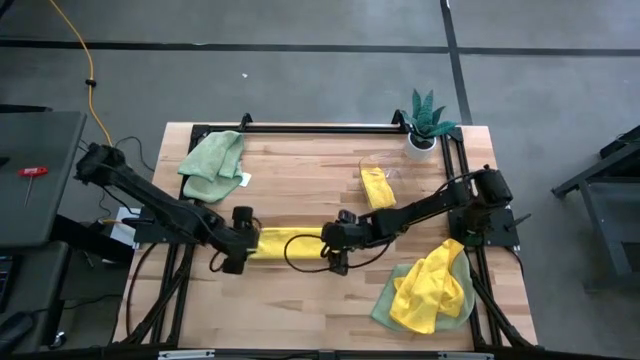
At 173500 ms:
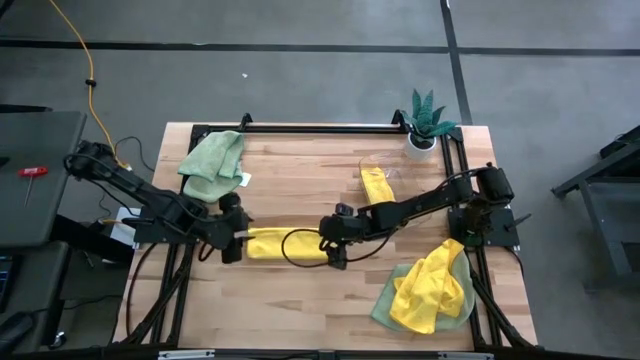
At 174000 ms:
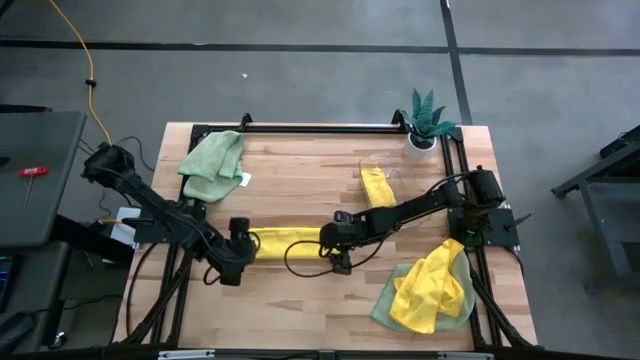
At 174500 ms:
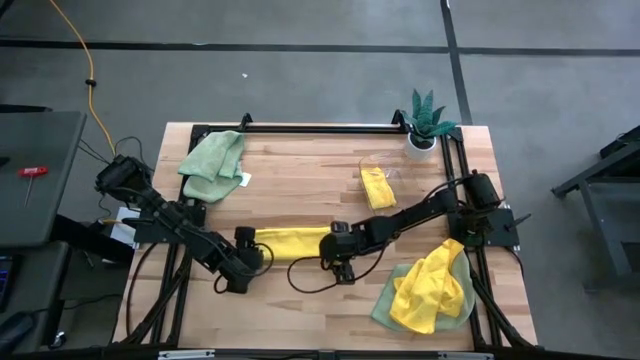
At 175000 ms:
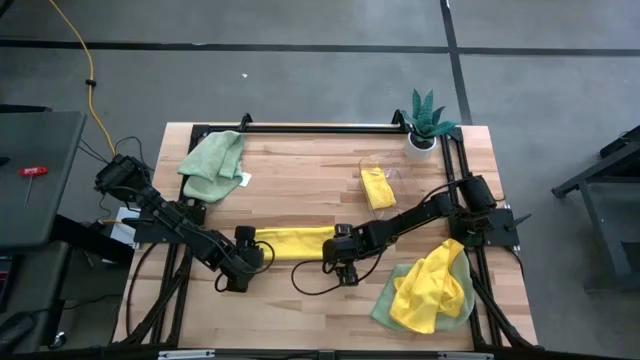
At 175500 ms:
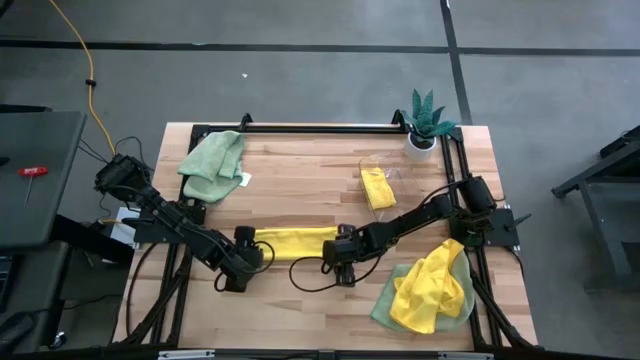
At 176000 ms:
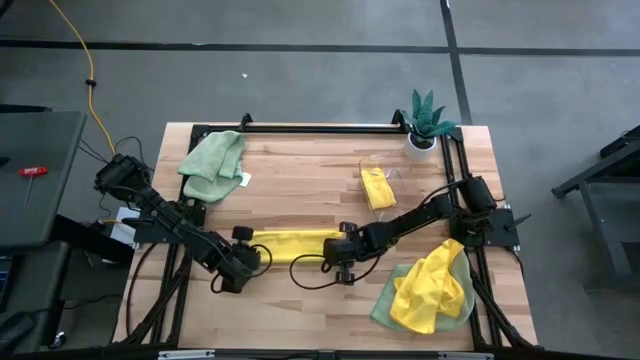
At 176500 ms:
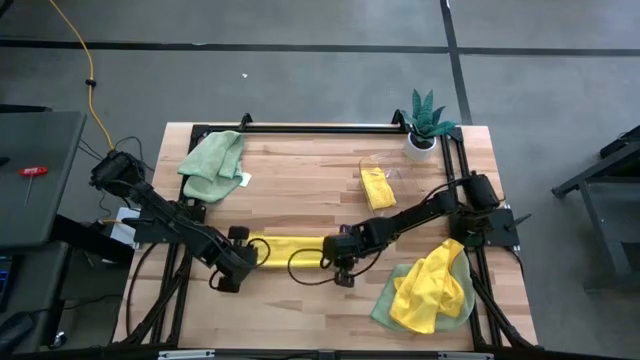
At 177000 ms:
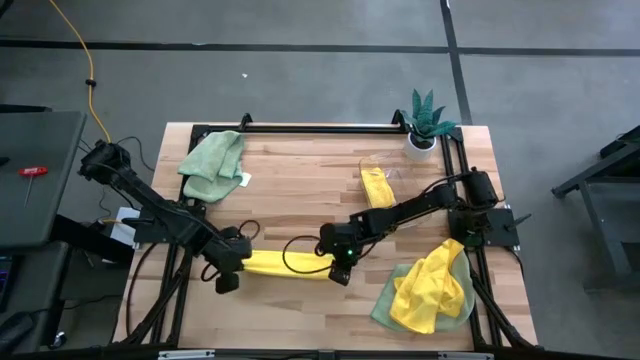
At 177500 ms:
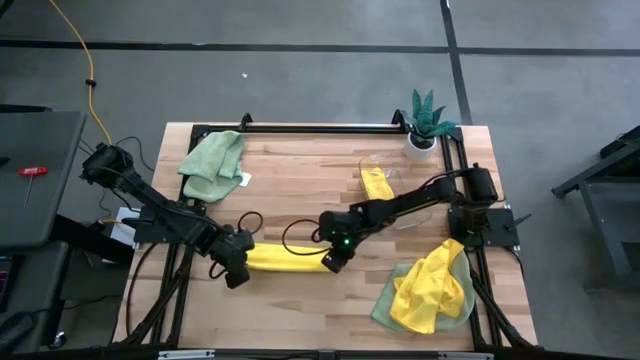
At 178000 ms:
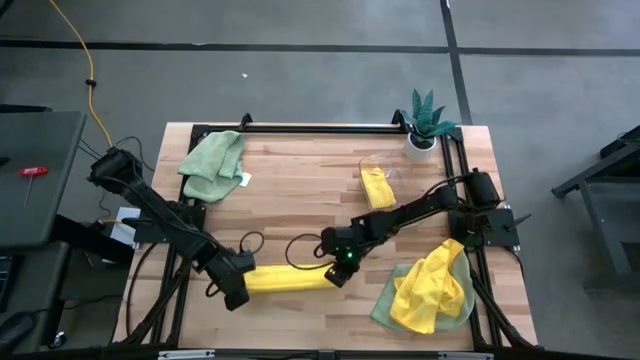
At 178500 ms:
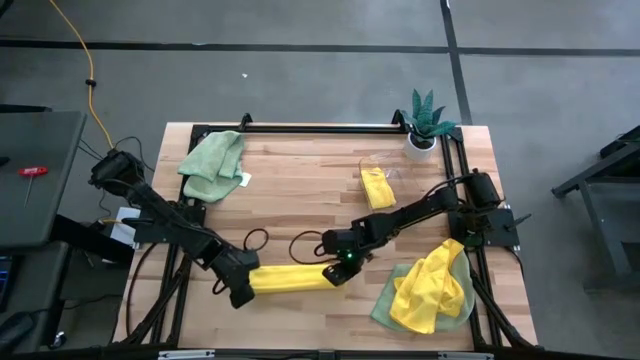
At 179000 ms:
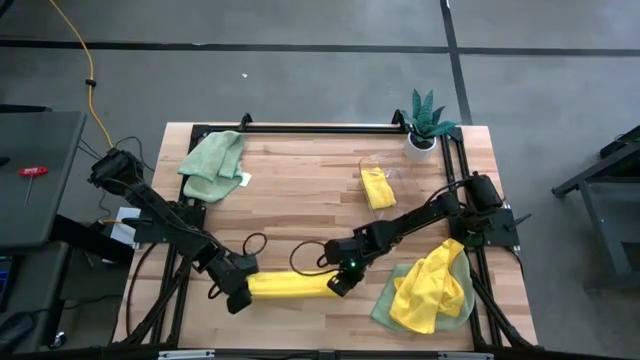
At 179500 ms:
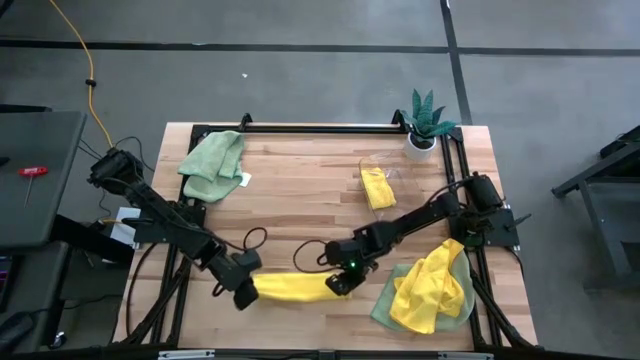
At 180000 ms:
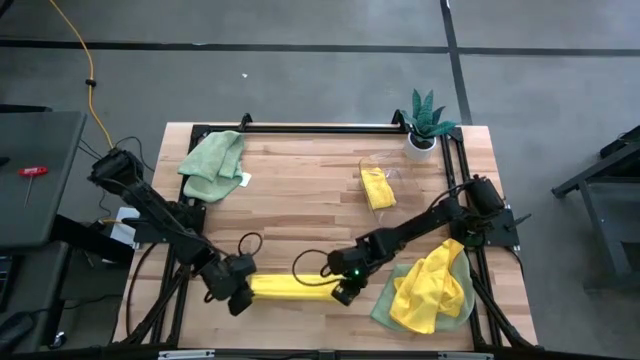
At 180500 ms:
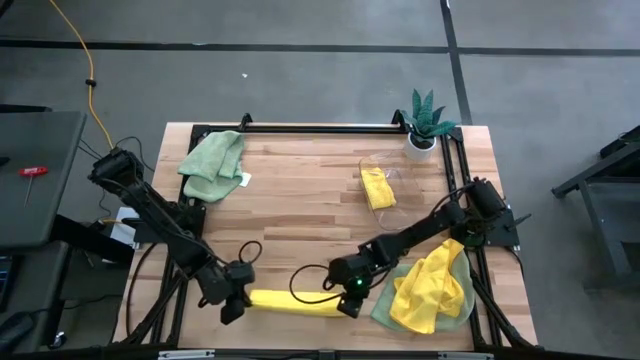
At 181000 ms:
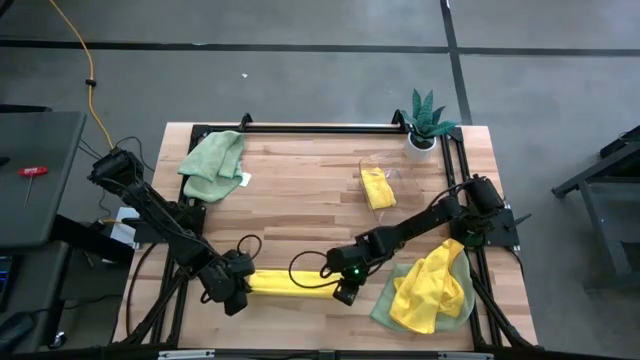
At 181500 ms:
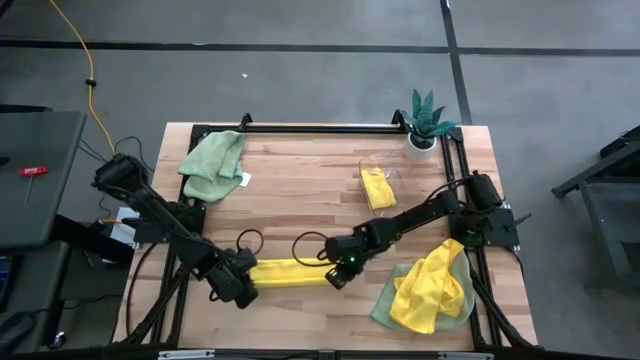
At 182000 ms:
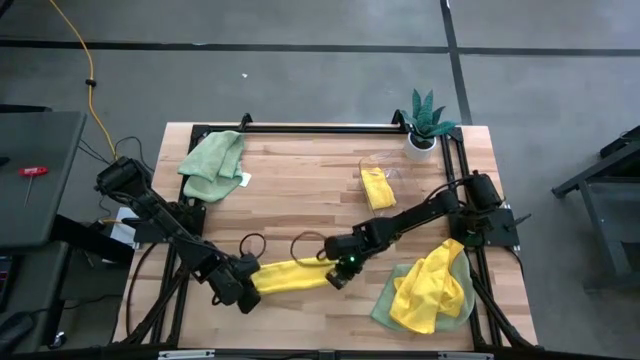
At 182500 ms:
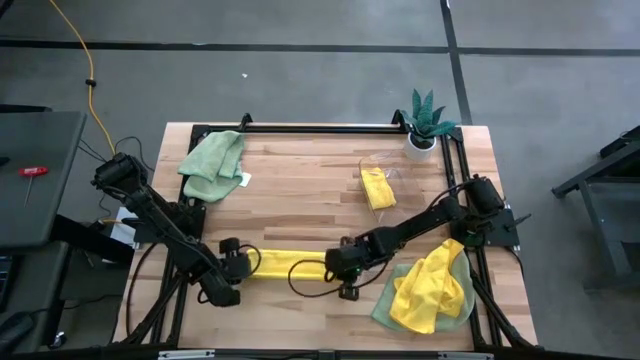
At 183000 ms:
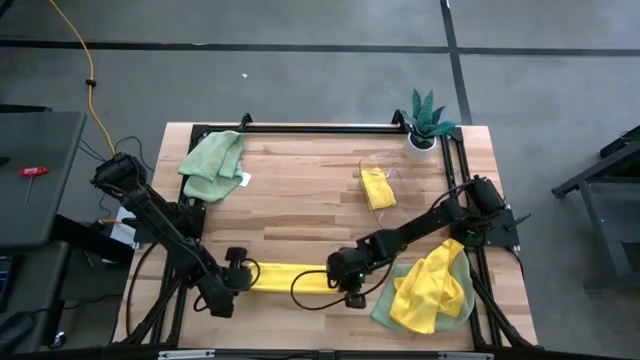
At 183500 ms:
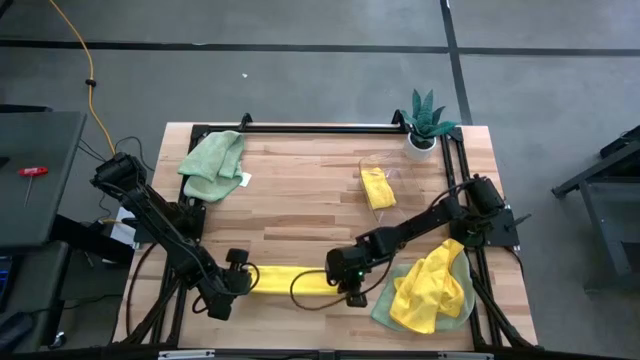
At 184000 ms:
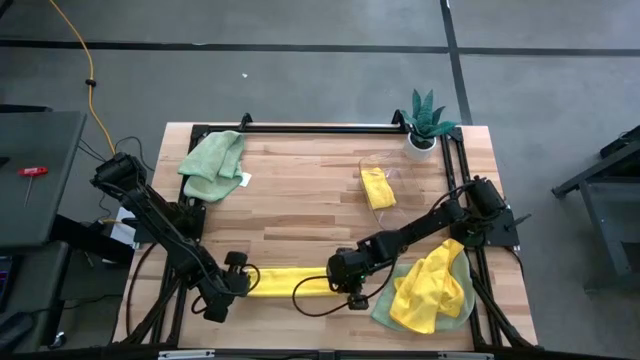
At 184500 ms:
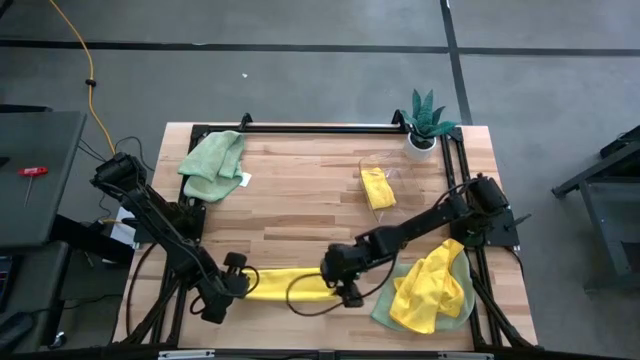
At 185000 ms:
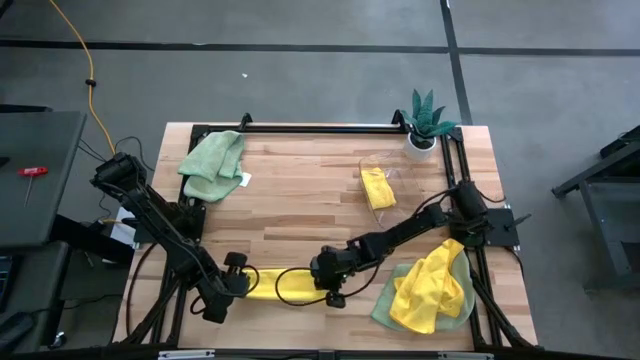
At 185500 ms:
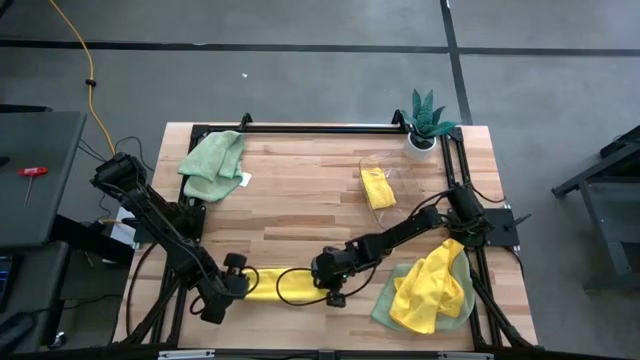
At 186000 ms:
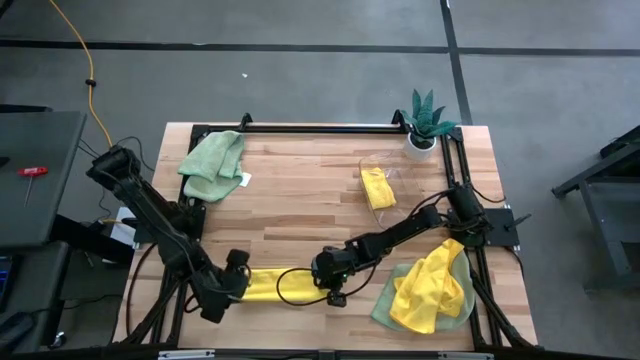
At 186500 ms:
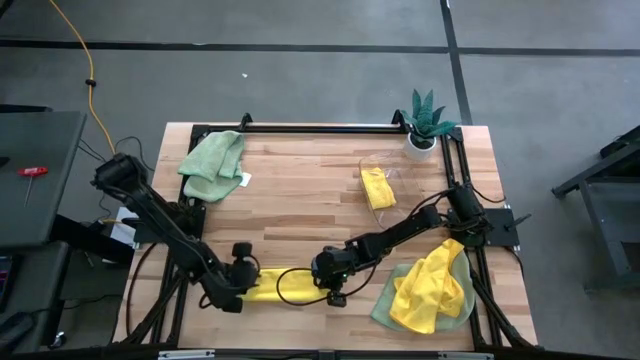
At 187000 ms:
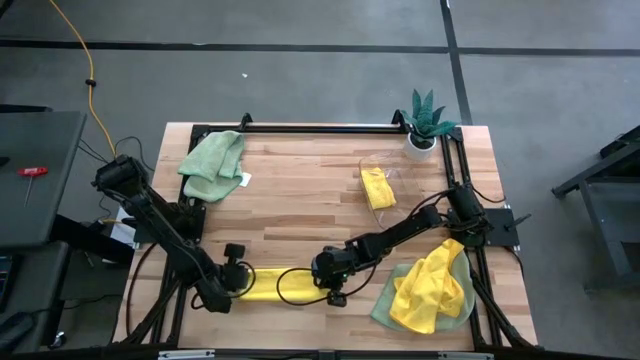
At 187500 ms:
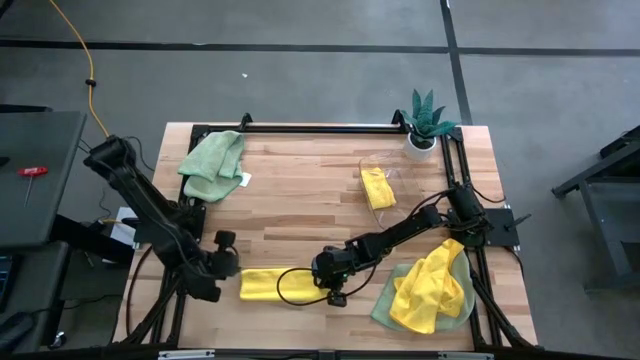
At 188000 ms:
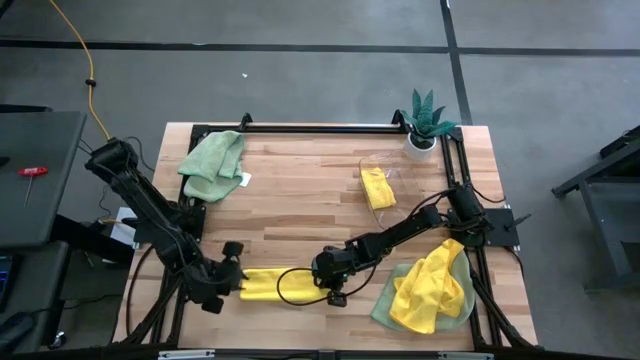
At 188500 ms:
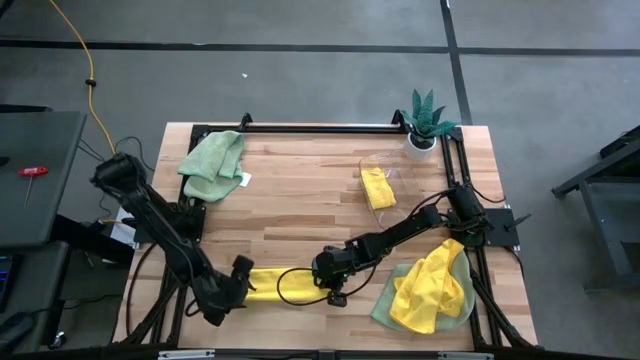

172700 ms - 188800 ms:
Task: Fold microfiber towels
Fold the top yellow microfiber towel

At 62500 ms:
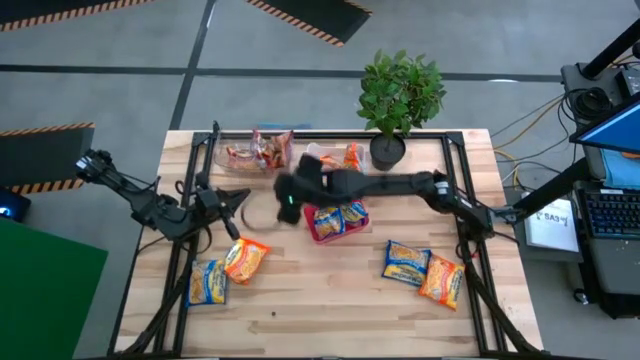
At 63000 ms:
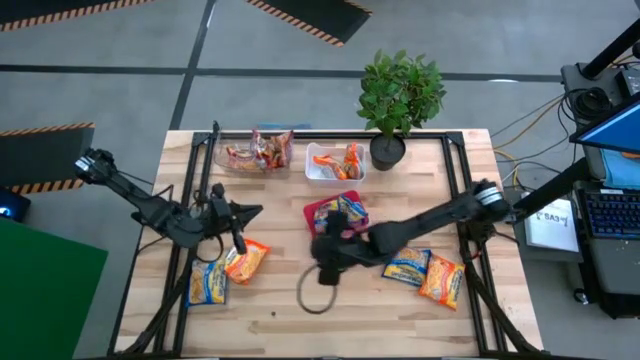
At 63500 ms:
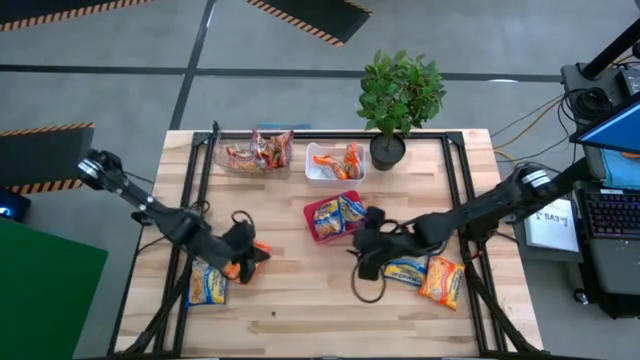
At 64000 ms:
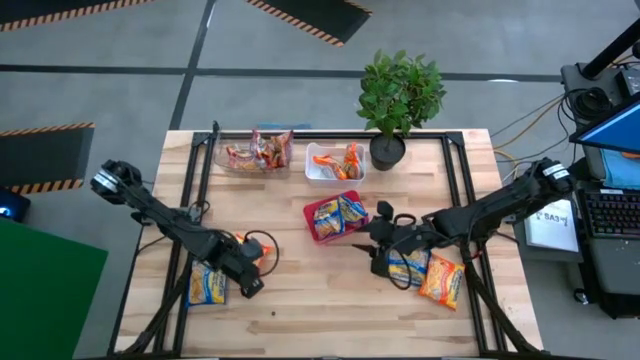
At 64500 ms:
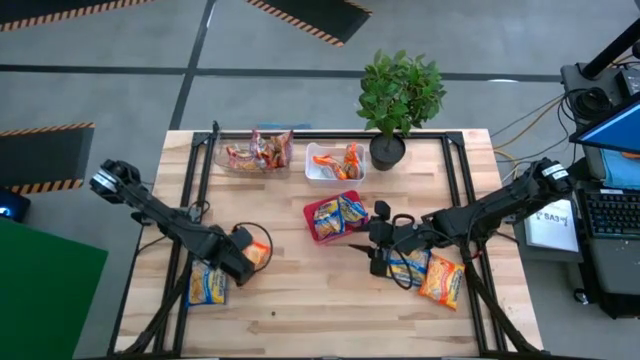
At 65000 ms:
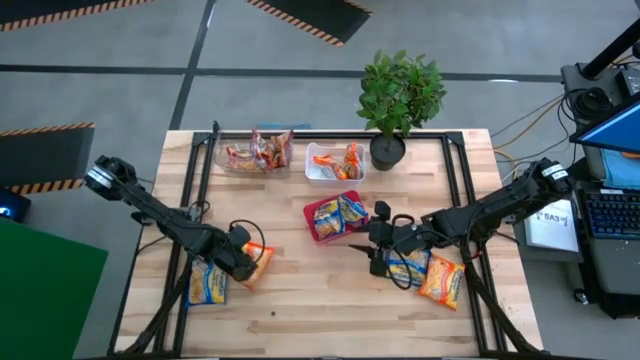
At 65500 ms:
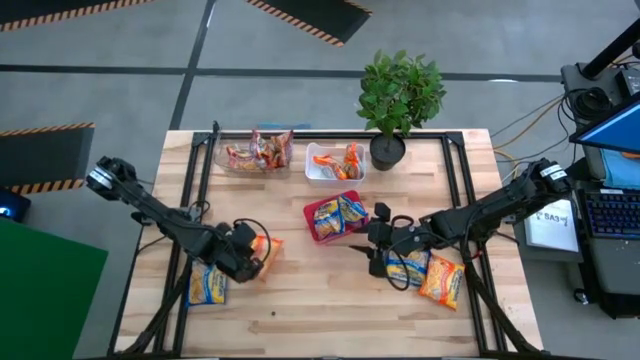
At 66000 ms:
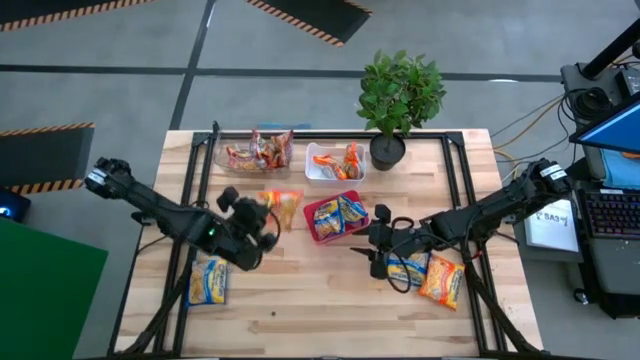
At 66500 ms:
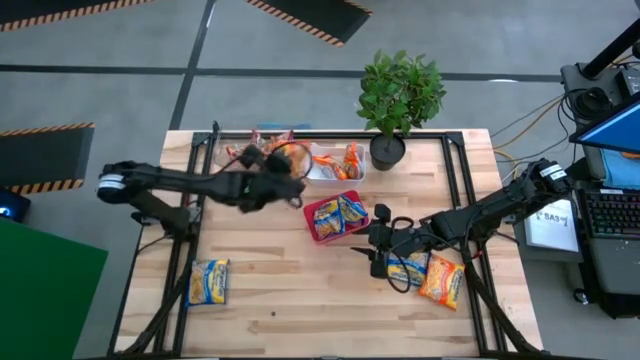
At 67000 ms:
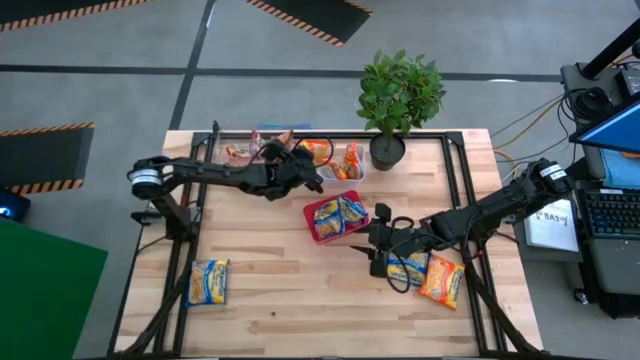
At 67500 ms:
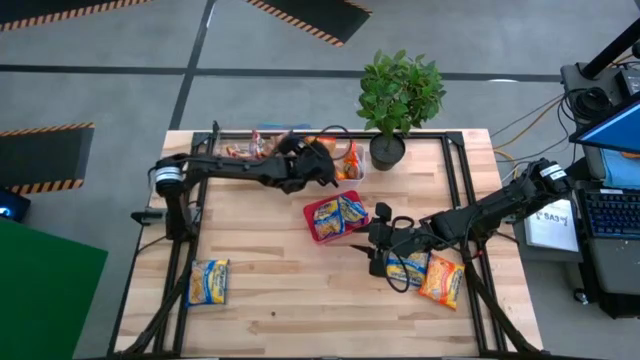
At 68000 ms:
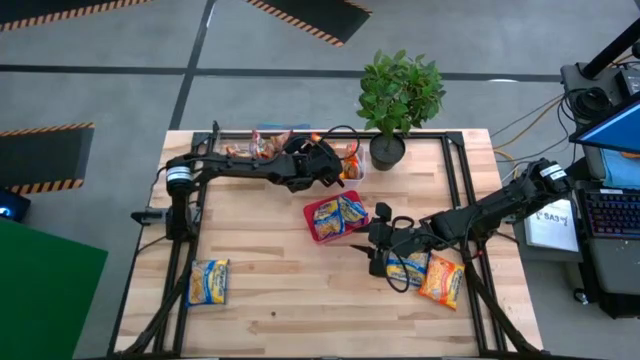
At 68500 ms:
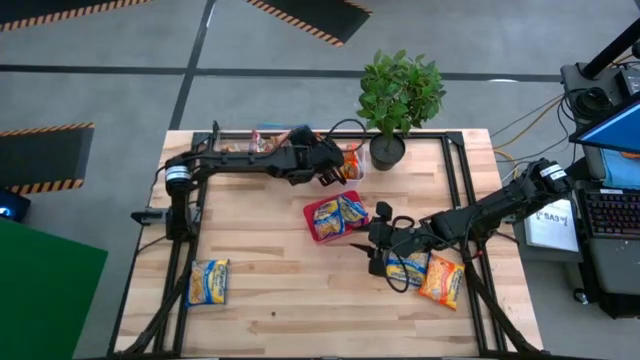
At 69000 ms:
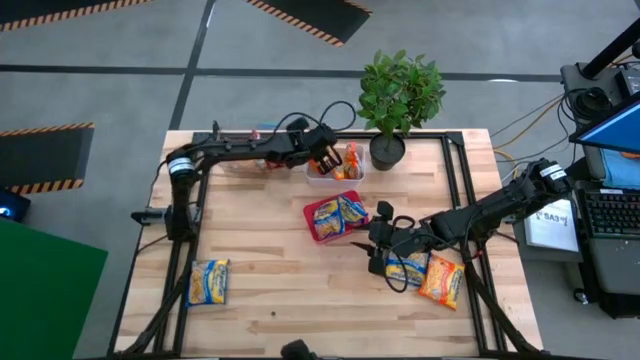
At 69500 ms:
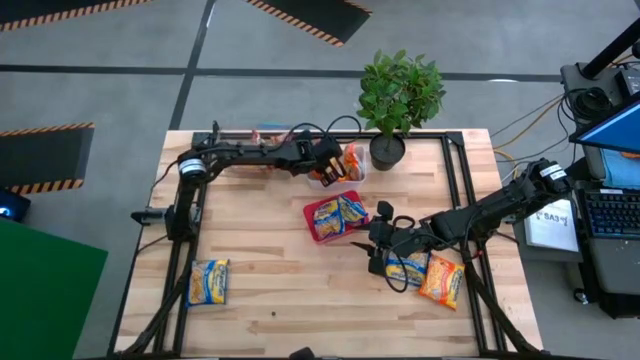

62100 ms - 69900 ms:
Task: Sort Maruchan noodles
Put the orange noodle pack into the white bin
